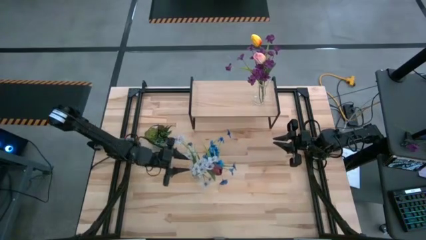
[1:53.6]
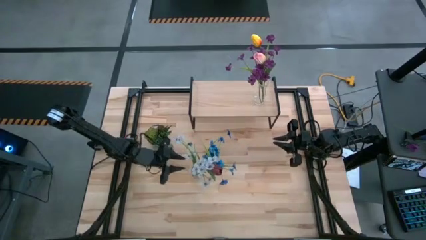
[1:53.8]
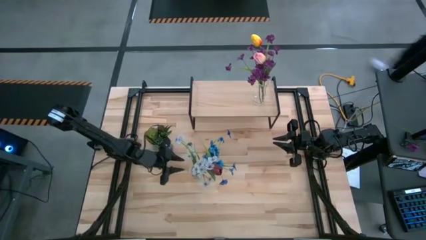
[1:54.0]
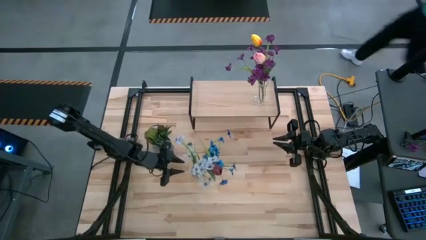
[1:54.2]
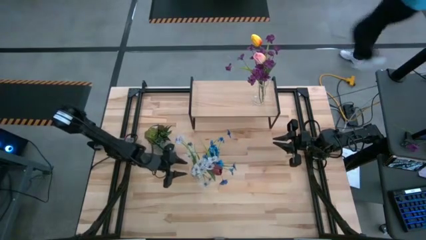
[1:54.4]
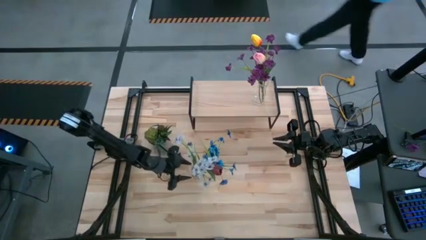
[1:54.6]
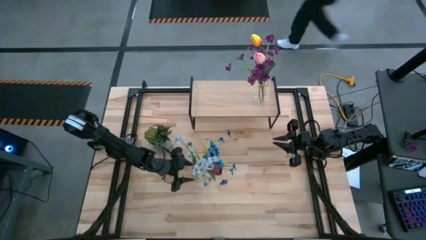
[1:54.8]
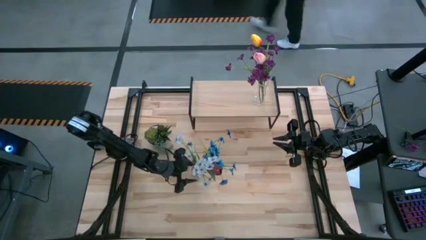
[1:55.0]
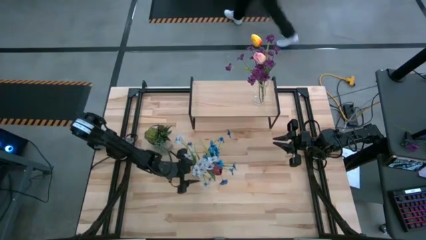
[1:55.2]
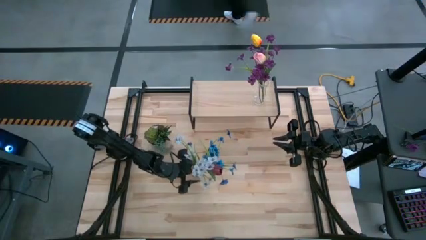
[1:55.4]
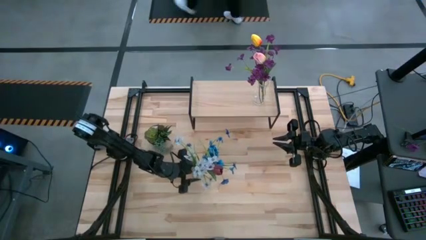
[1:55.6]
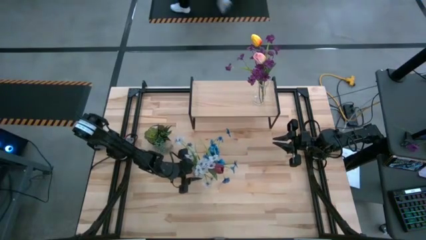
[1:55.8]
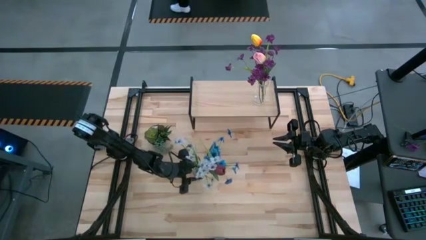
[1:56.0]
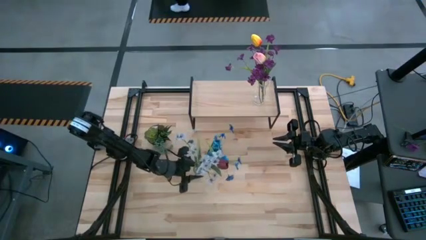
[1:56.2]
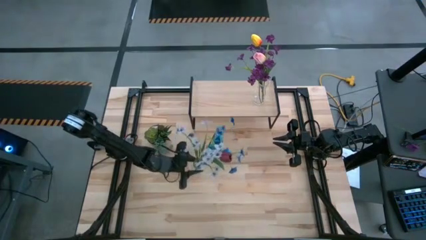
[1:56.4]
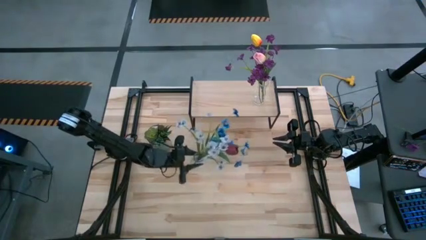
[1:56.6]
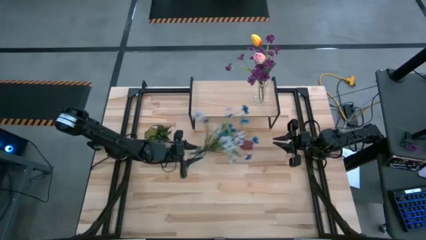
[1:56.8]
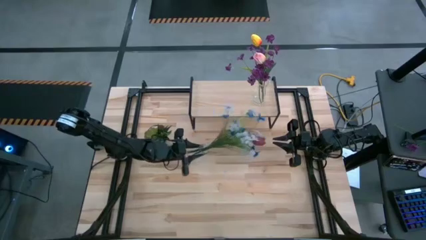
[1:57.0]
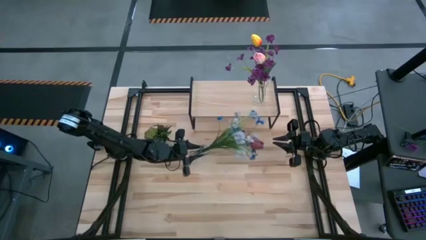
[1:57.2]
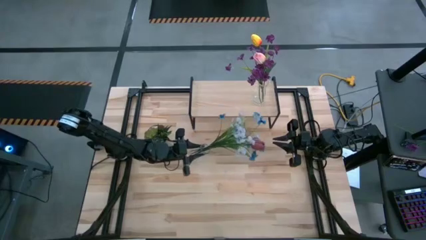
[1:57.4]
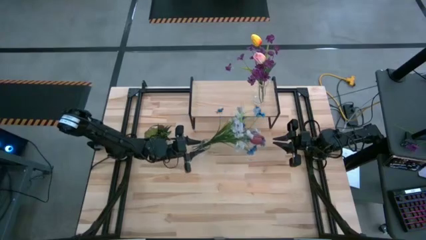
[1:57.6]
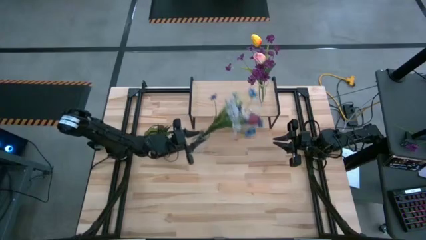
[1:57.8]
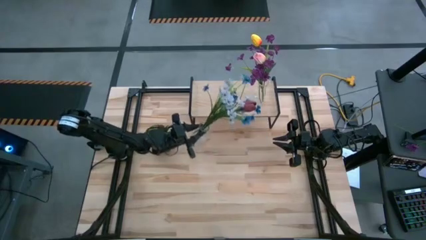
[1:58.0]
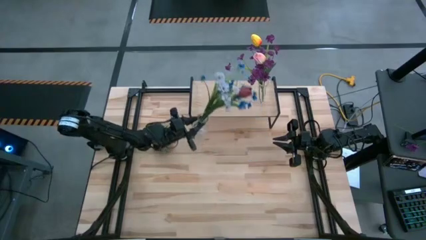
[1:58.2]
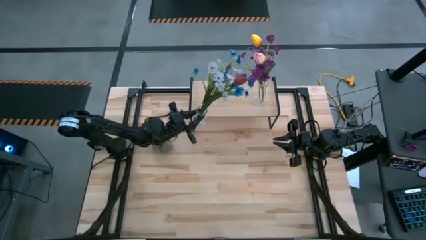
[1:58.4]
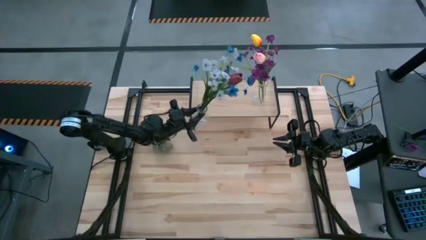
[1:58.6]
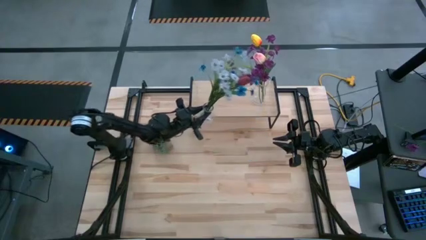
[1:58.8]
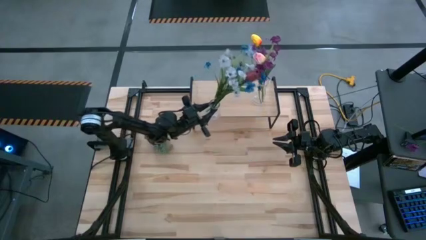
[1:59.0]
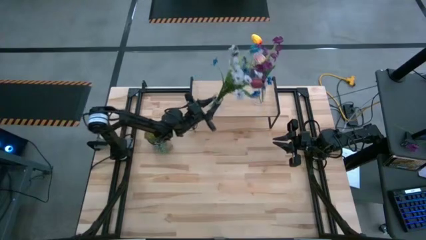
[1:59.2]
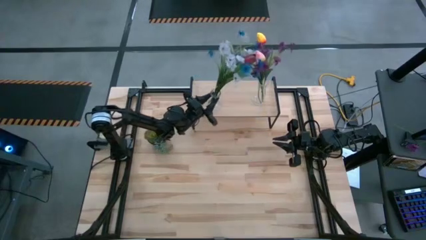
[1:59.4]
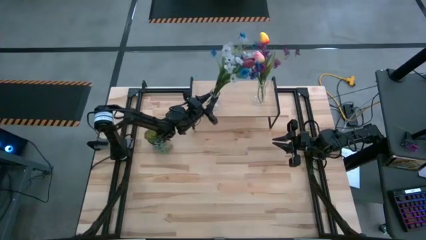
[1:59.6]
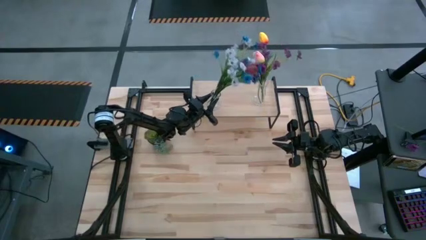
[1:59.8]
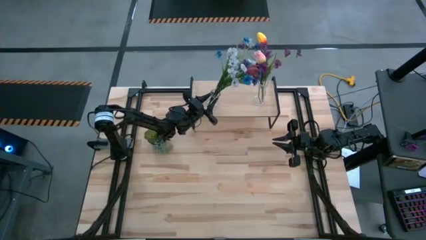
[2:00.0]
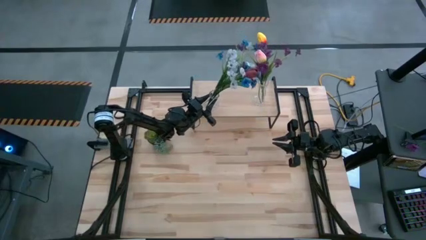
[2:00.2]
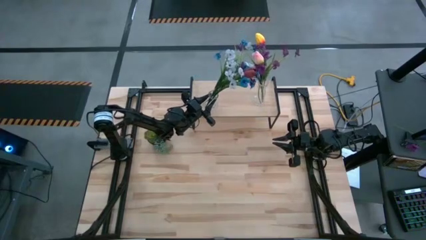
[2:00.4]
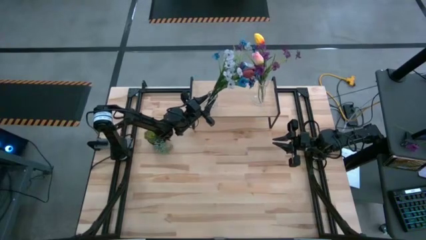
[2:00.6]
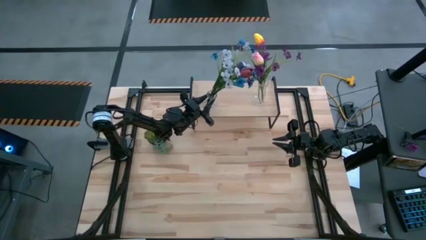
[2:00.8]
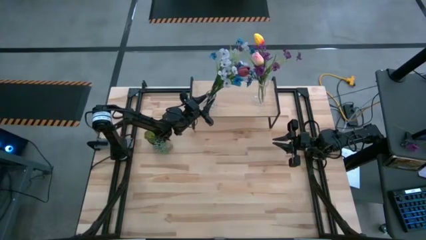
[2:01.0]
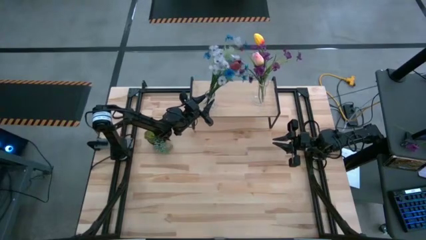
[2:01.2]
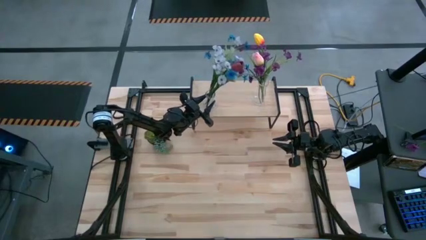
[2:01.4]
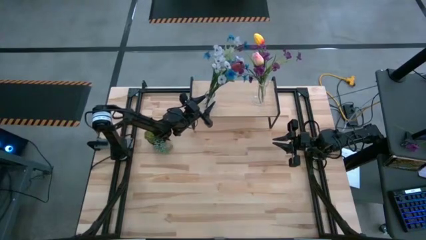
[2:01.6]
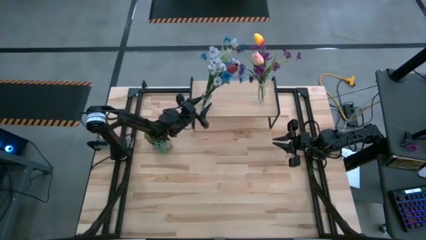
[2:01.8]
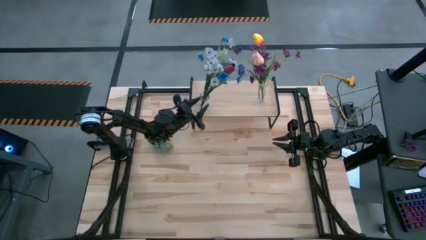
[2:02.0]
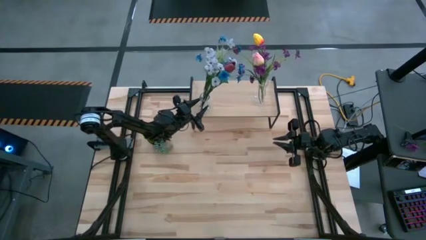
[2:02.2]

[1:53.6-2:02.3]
Task: Pick and place flowers into a vace then onto a shelf
Put the transparent vase on the shelf

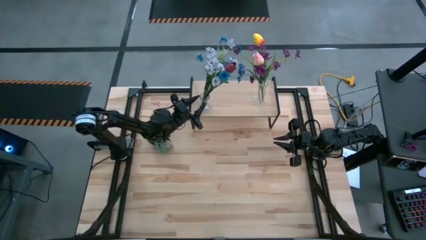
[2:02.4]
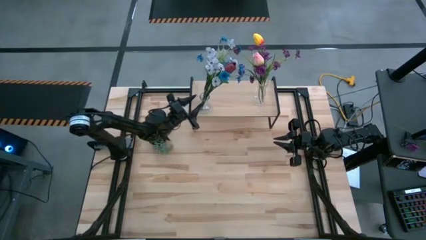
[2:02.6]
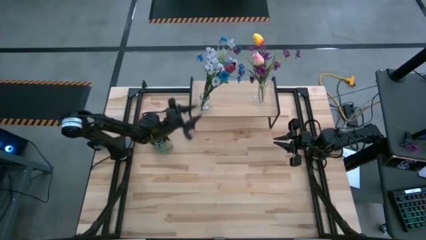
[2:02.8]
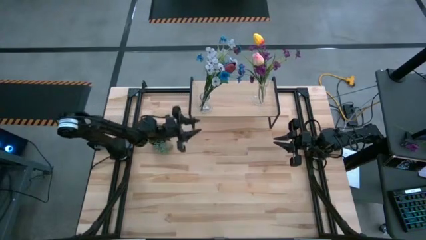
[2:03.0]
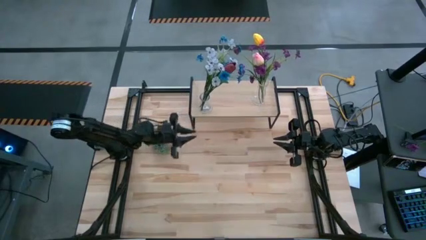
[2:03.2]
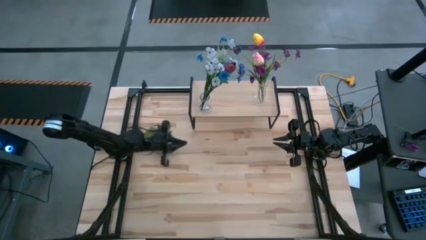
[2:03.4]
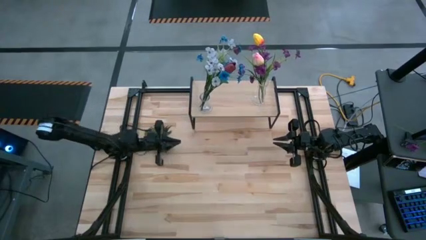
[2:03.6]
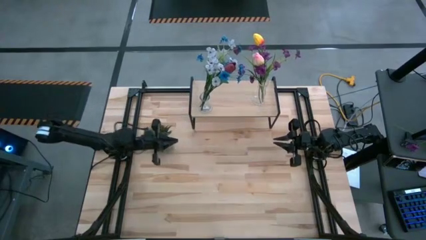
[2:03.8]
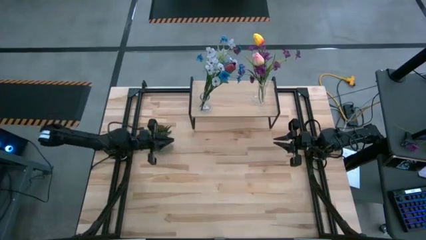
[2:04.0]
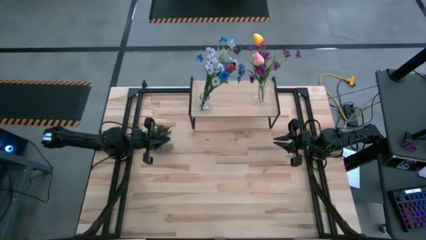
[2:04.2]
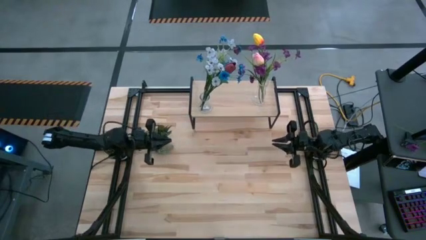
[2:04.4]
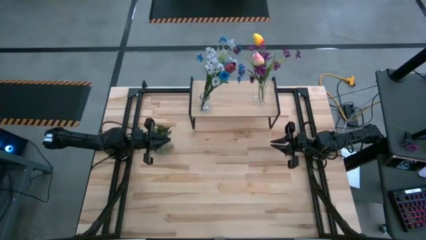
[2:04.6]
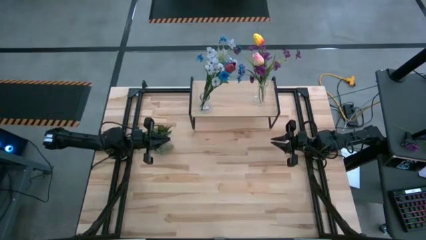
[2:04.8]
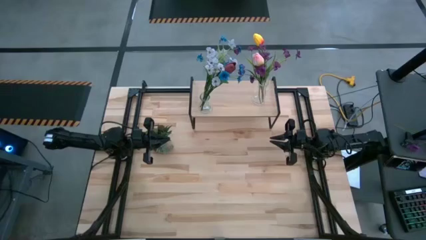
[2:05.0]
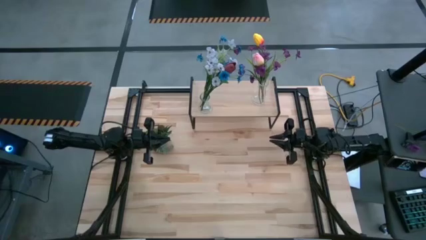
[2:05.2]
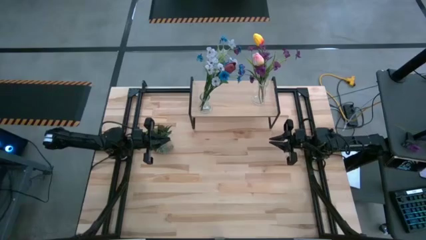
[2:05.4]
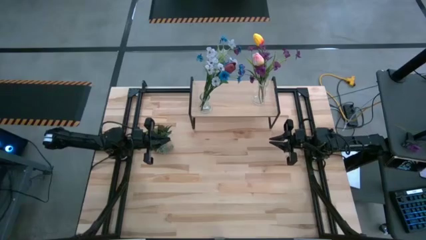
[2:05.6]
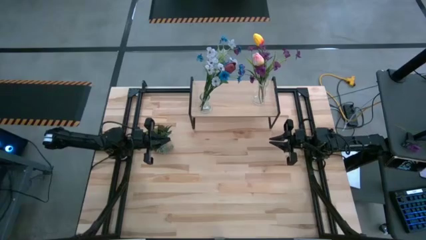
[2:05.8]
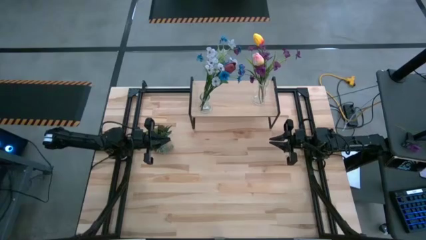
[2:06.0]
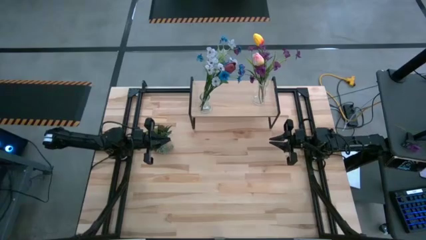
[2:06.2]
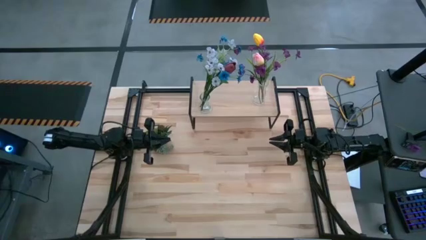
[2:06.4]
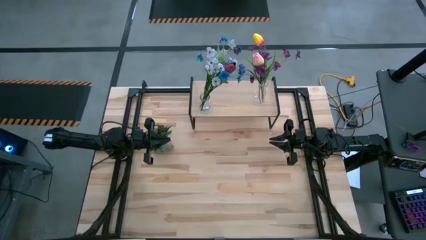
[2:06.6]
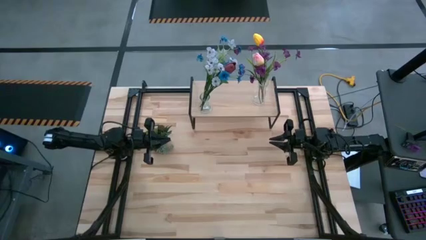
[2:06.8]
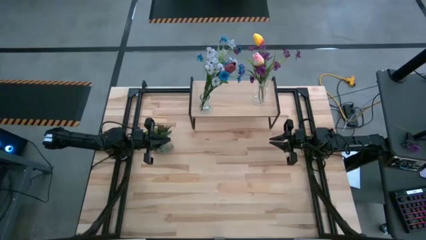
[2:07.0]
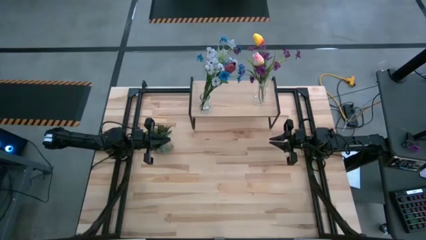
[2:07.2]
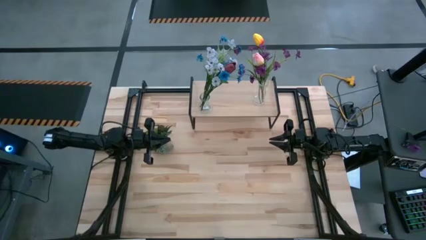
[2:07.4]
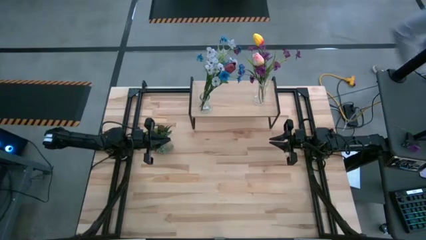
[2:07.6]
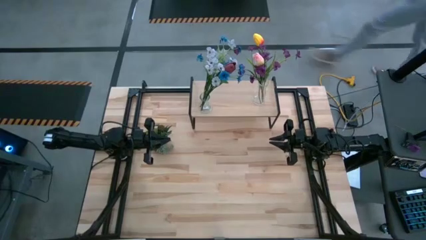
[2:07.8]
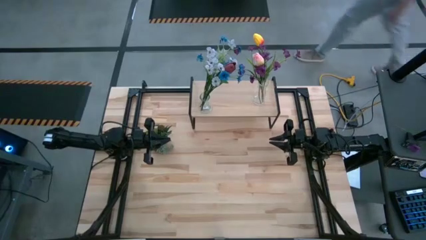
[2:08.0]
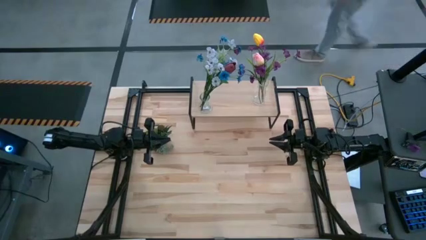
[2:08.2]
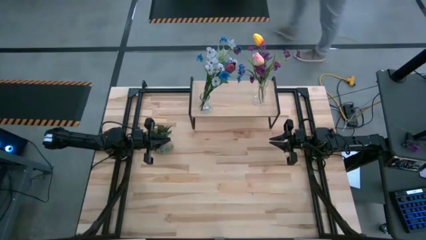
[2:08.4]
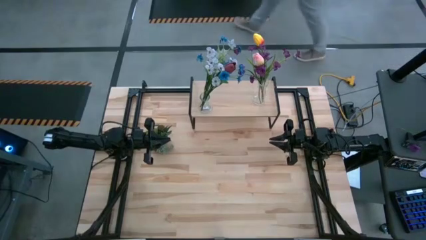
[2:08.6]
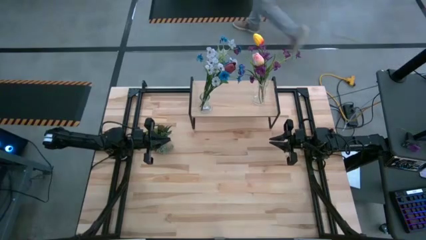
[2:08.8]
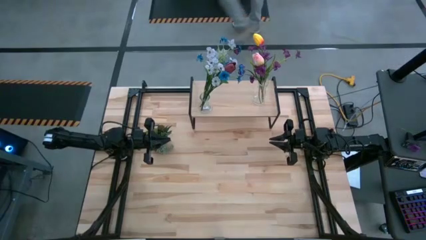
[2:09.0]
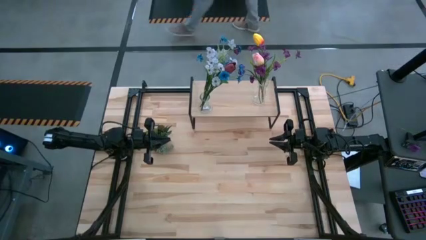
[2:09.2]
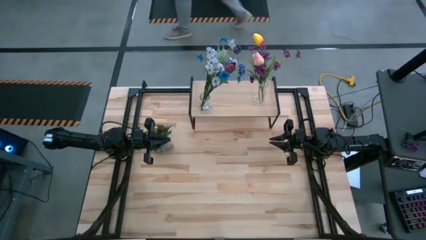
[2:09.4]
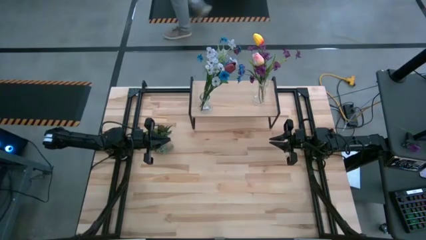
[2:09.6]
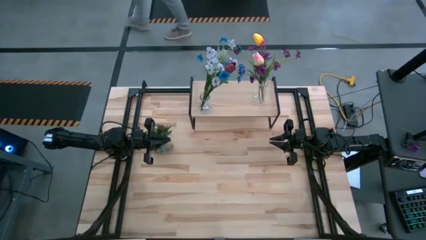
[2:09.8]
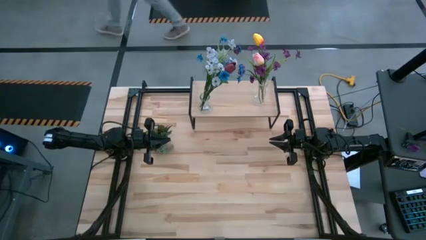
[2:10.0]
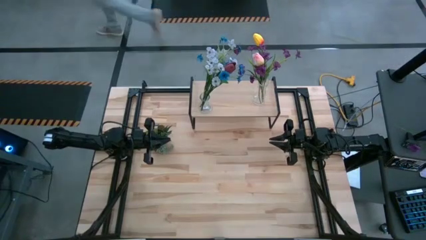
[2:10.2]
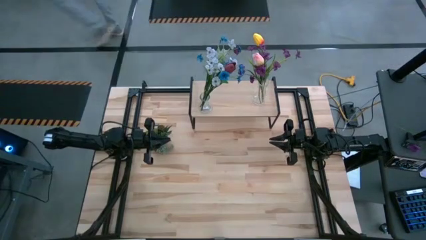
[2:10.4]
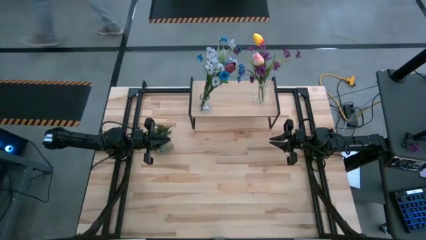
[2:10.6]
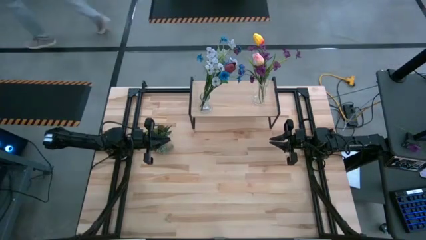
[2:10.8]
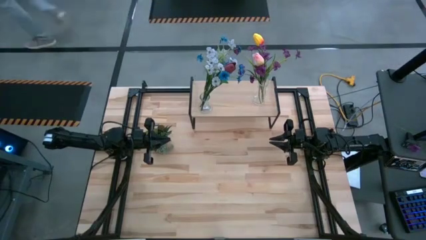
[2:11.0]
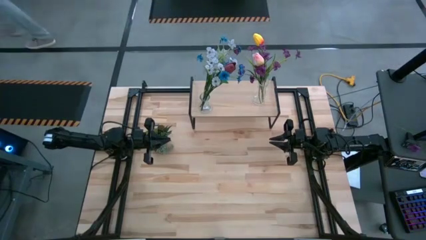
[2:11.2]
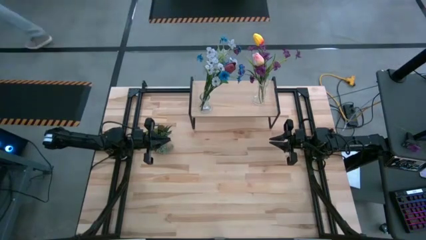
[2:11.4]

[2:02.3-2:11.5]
Return to Home Position
